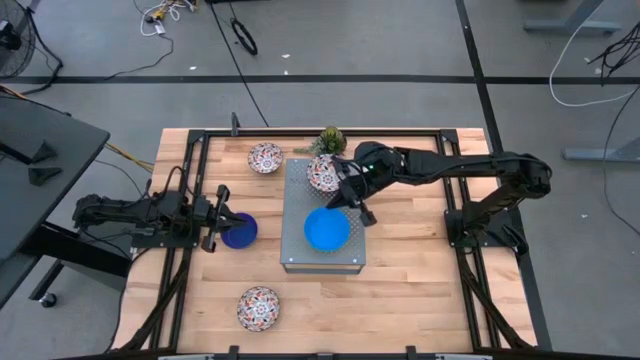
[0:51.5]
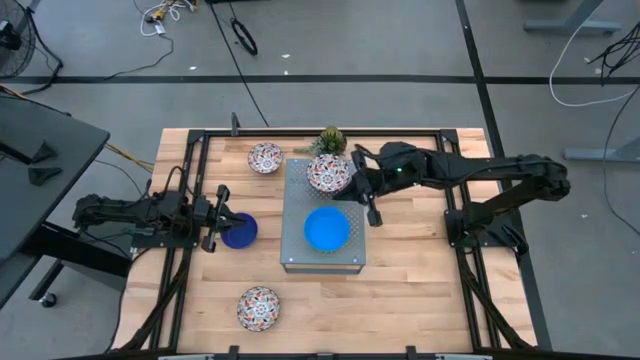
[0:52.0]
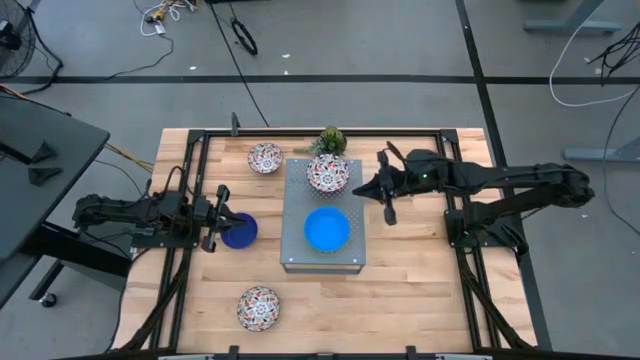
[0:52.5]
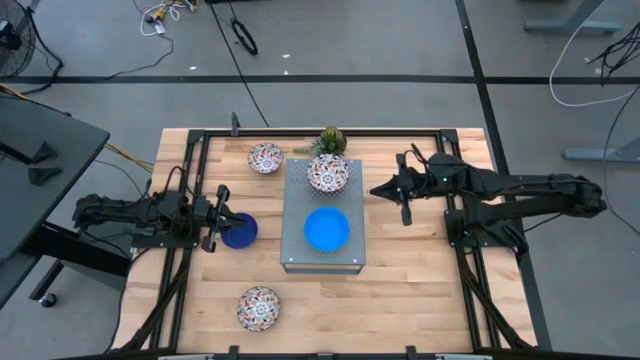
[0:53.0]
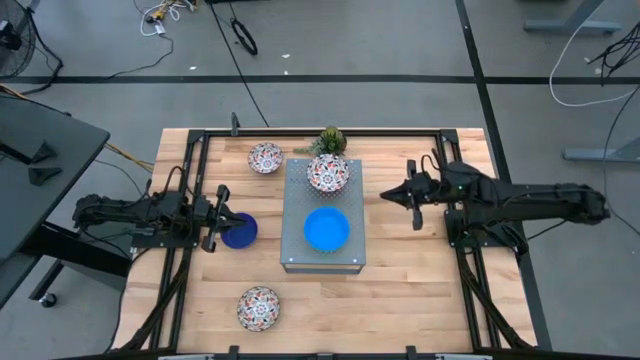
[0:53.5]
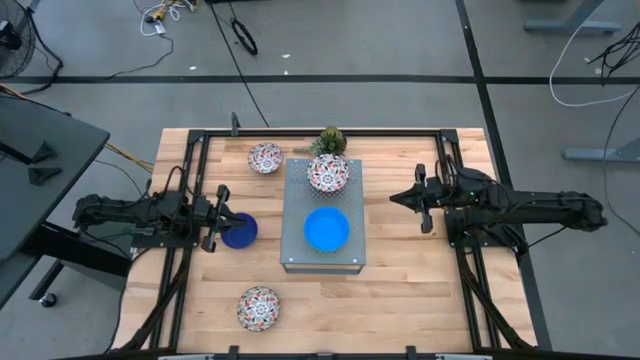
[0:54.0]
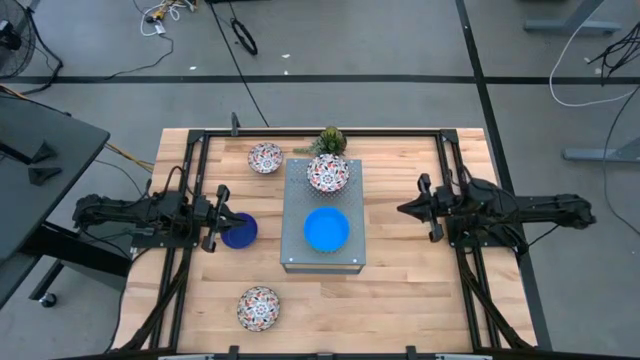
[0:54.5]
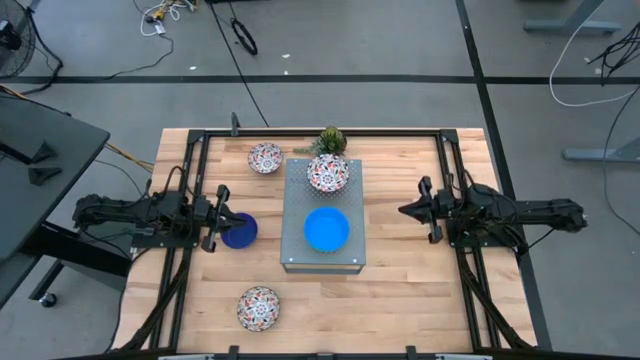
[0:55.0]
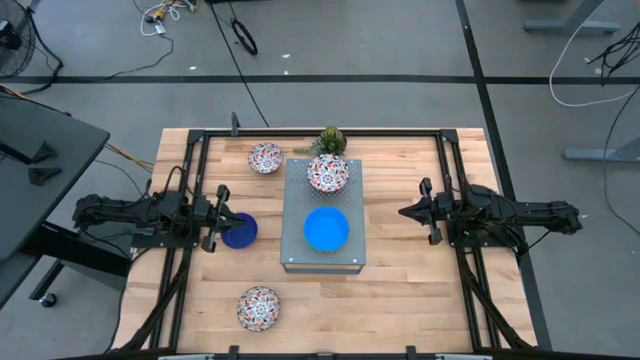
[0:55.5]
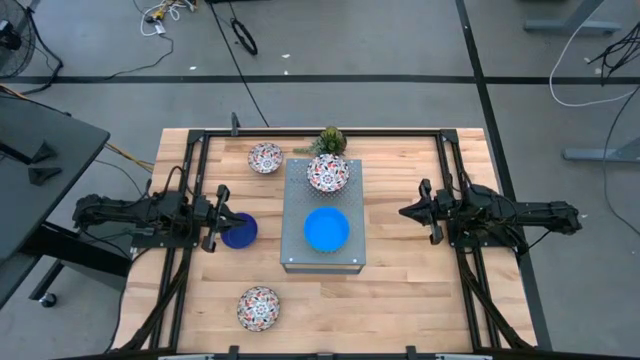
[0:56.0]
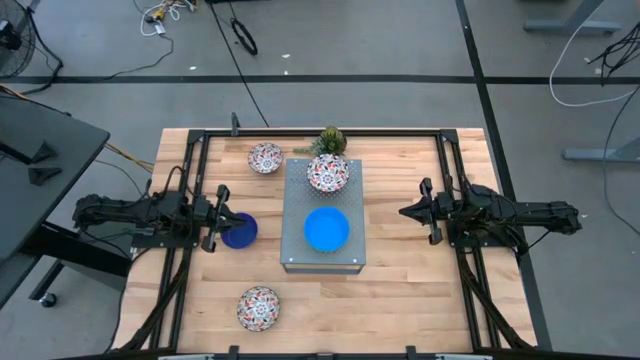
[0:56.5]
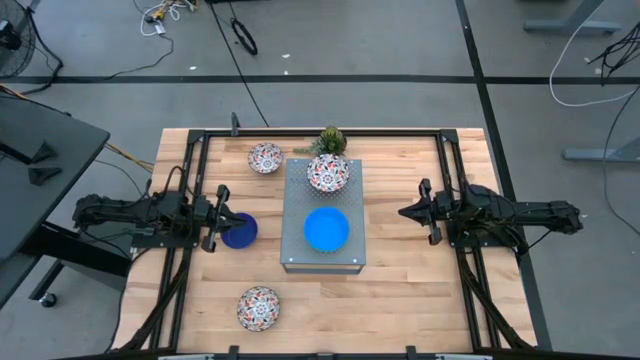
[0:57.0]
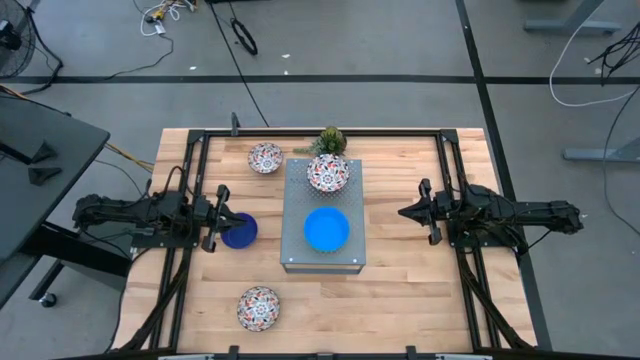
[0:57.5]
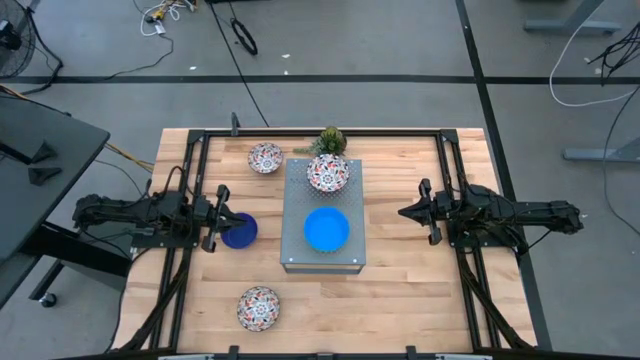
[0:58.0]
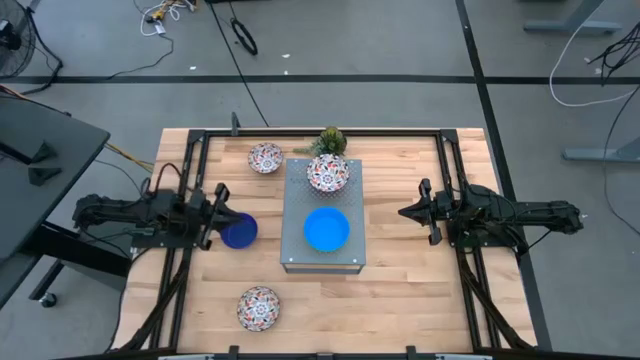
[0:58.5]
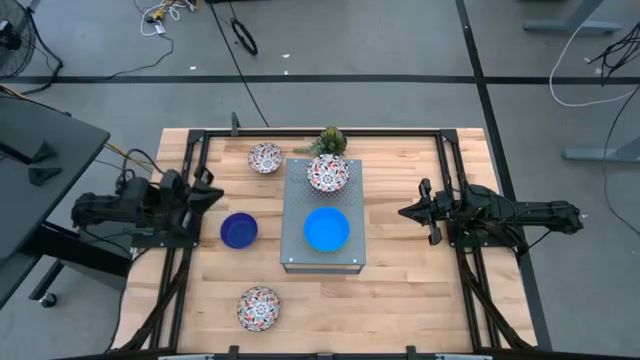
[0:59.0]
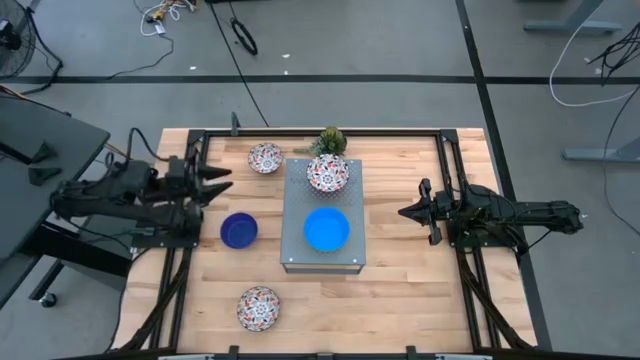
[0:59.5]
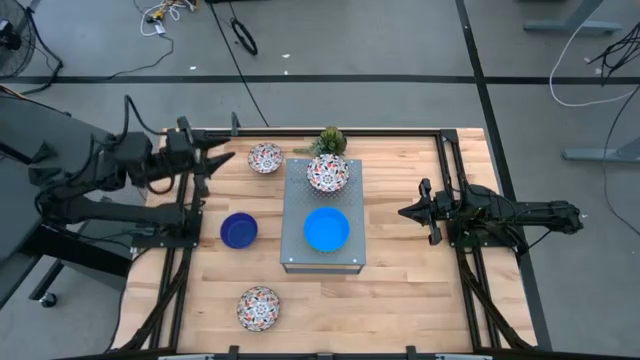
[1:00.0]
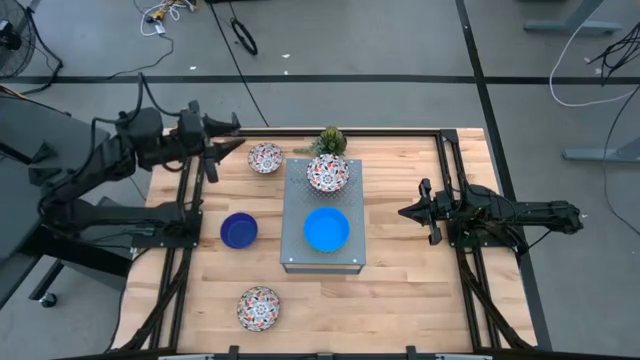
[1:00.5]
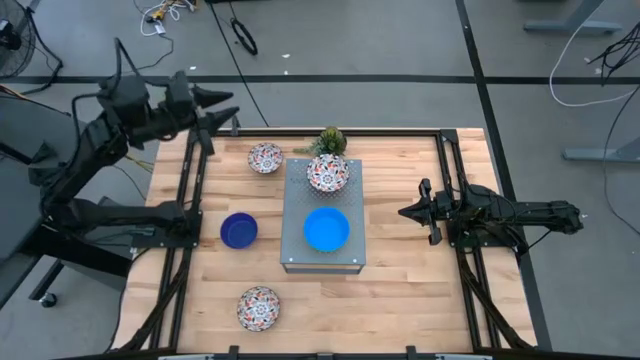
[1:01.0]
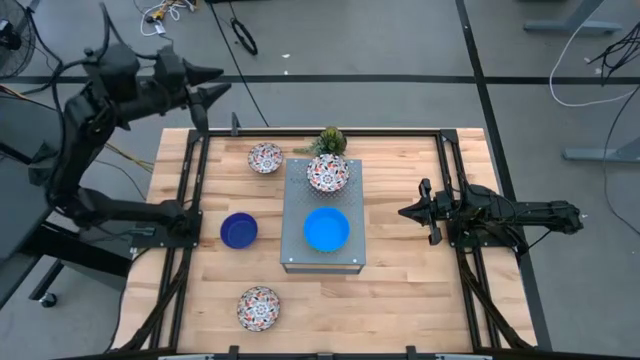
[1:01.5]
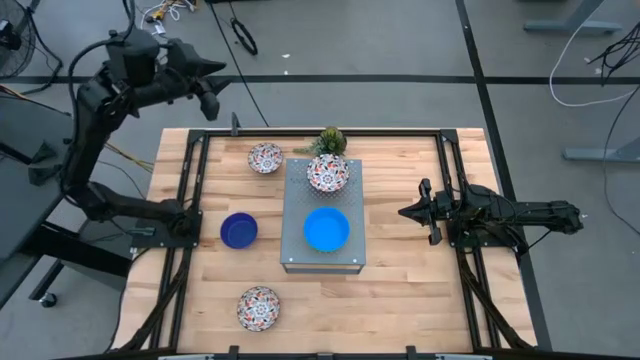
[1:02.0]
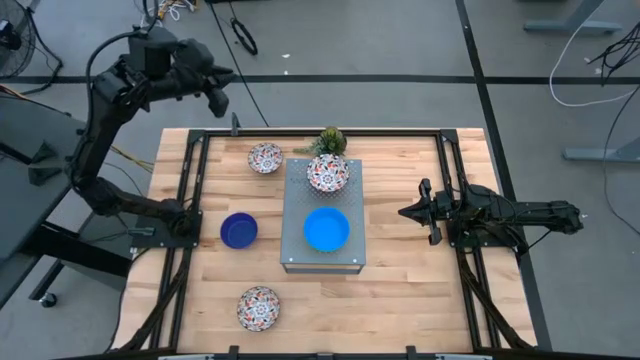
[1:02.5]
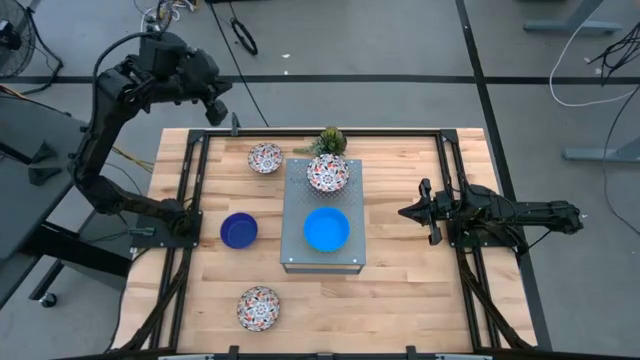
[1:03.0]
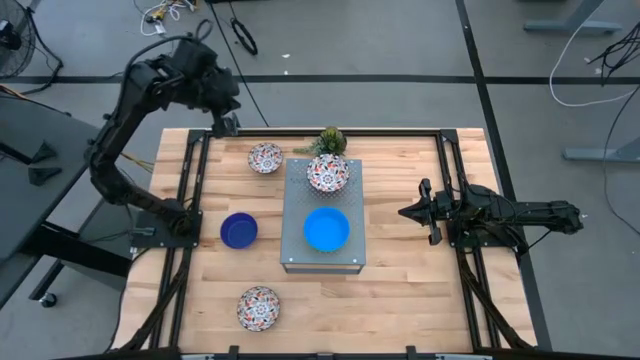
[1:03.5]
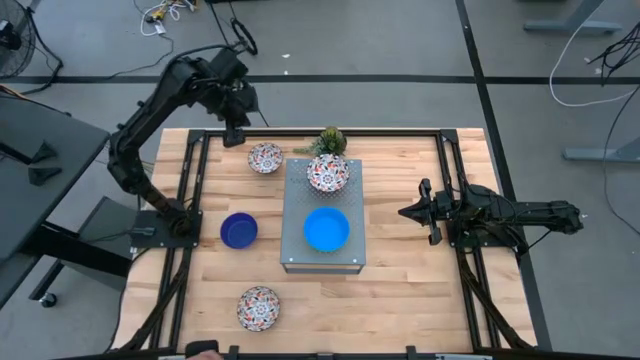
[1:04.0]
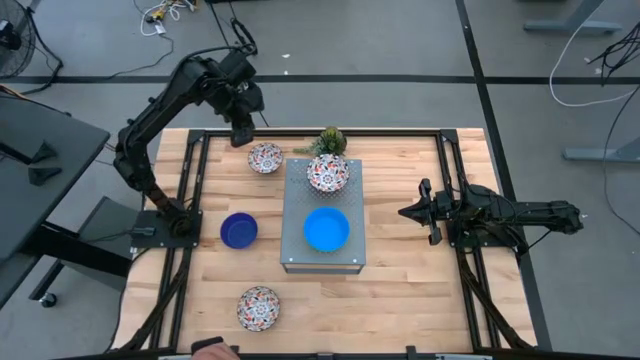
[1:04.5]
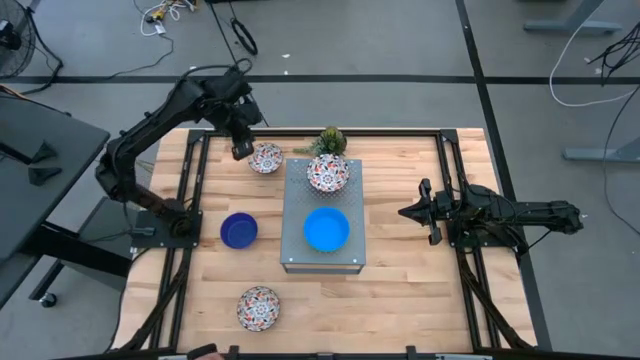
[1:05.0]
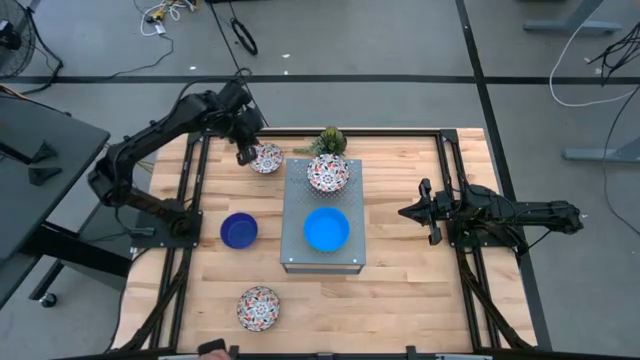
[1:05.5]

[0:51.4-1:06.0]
Task: Pick & Place Mini bowls
Stack the top white patterned bowl on the other white patterned bowl on the shelf

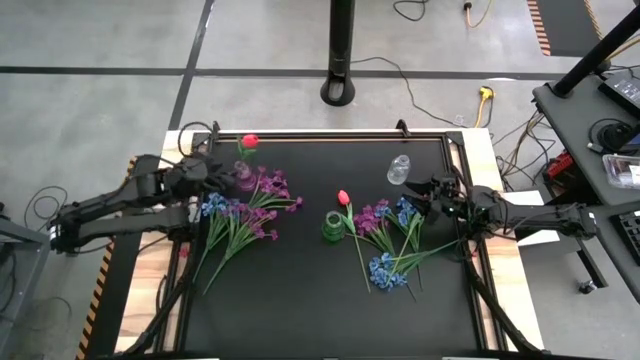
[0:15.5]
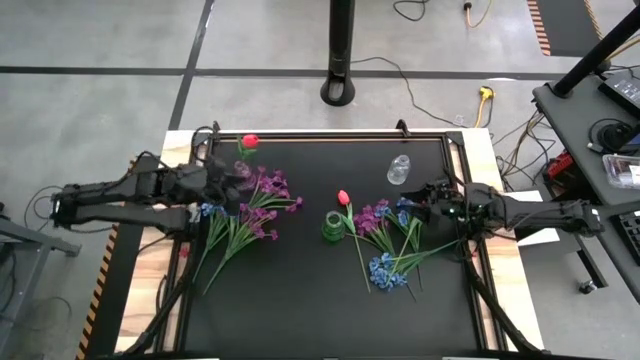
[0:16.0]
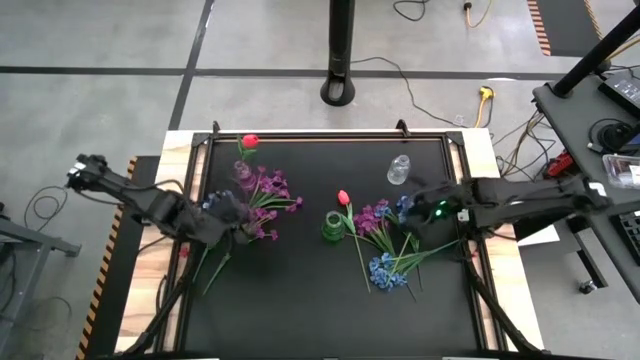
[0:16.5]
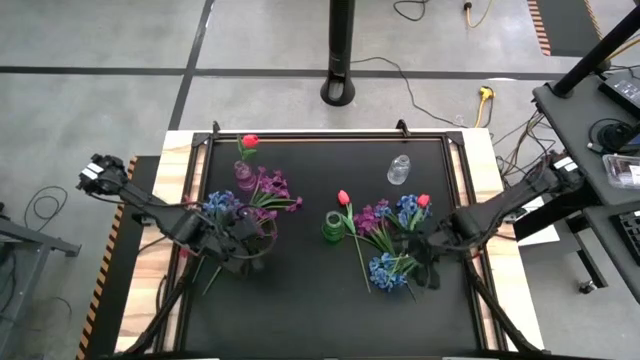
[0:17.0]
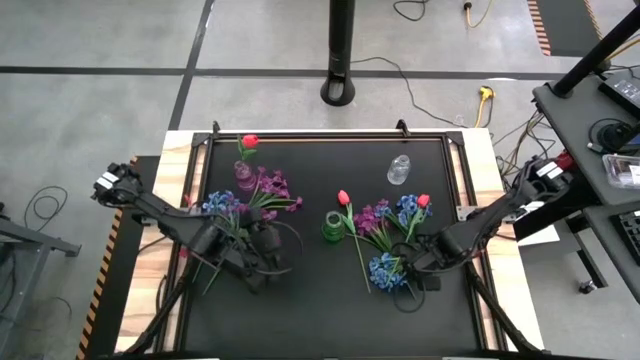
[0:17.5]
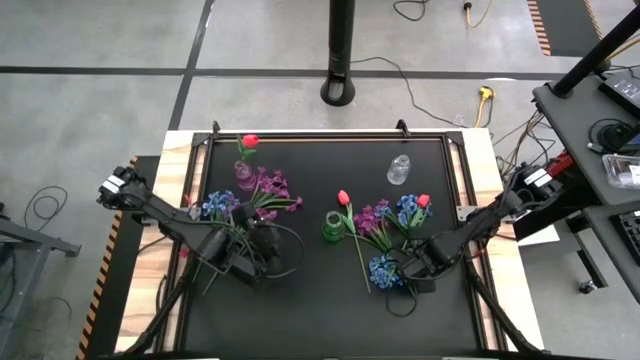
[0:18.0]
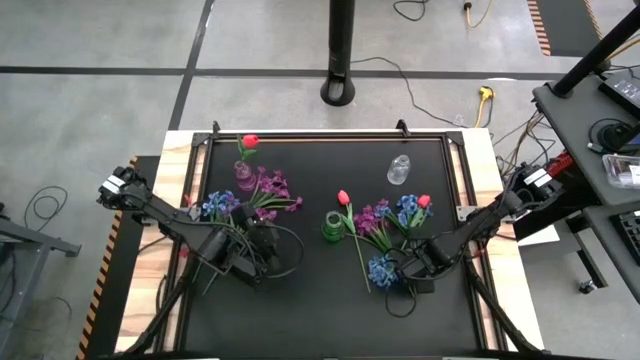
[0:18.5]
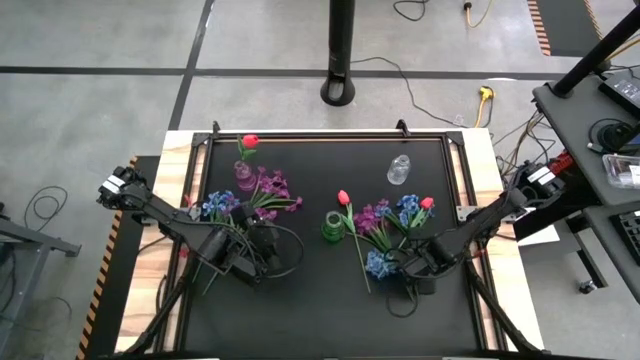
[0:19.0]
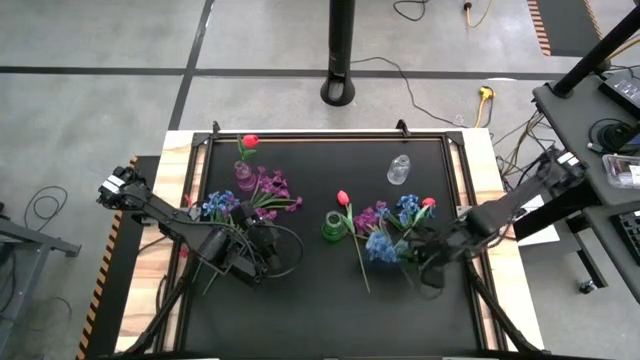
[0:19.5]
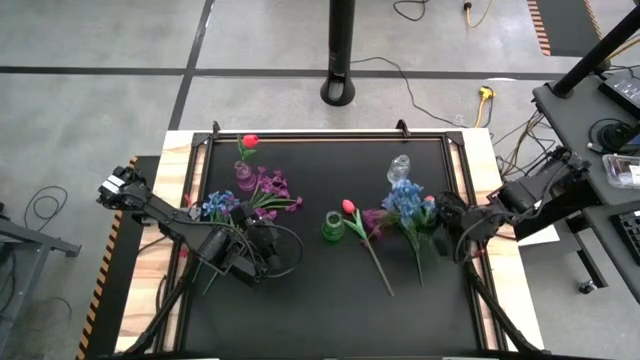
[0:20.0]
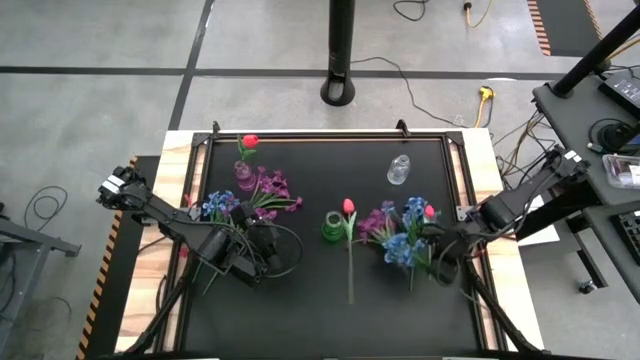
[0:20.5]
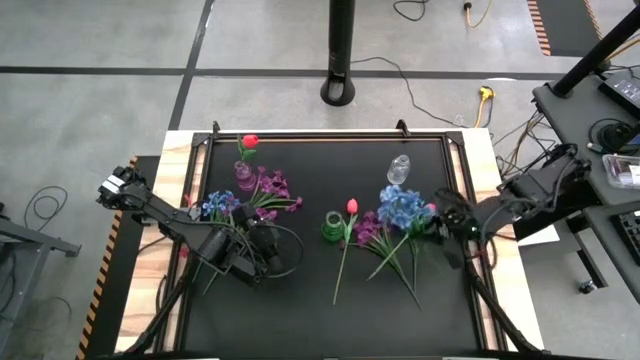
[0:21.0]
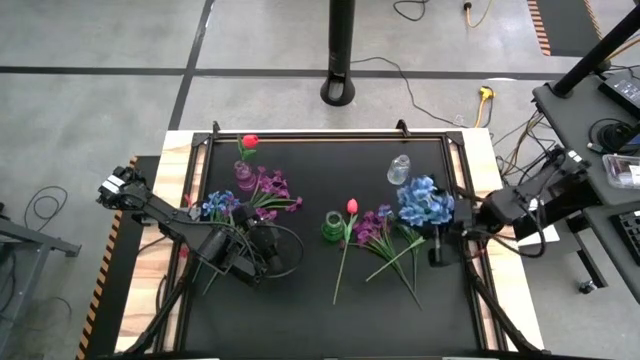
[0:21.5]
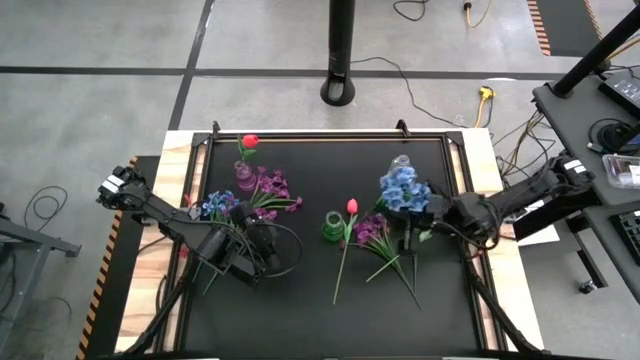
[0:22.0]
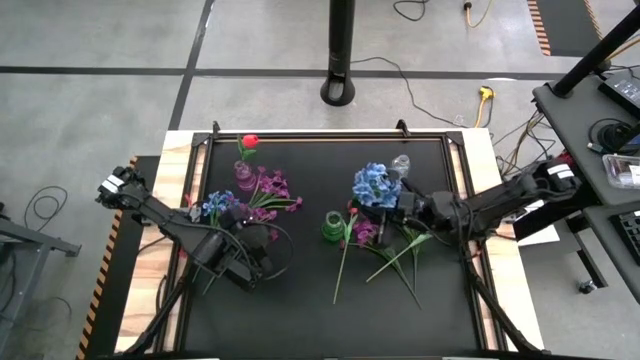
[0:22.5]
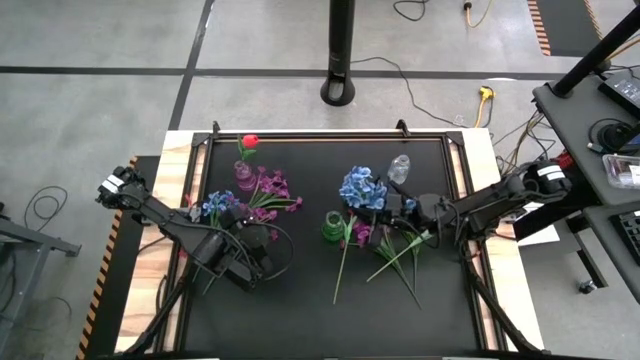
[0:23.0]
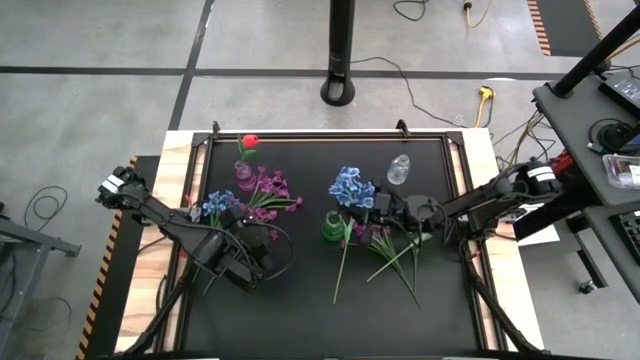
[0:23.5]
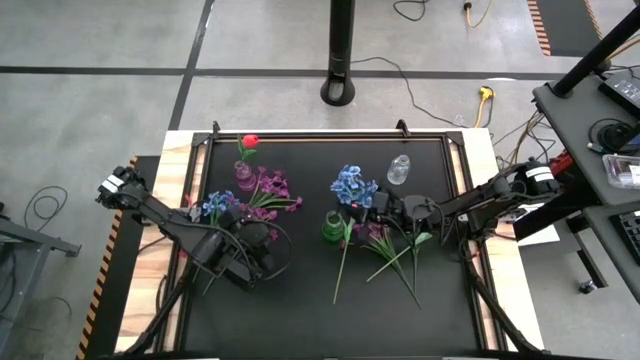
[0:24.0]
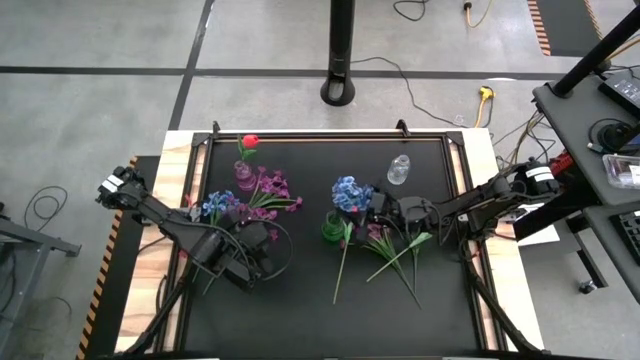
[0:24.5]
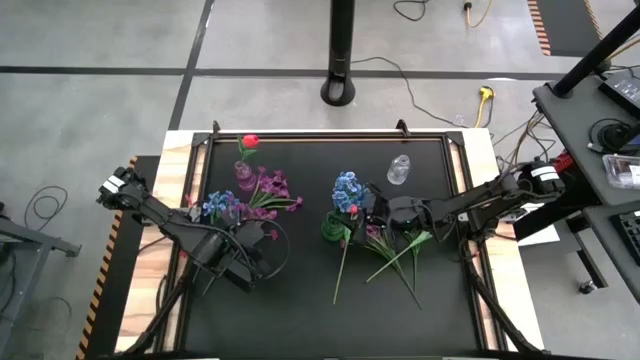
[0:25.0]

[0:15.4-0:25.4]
Task: Sort flowers into vase by color
Put the bottom right blue flowers into the green vase
